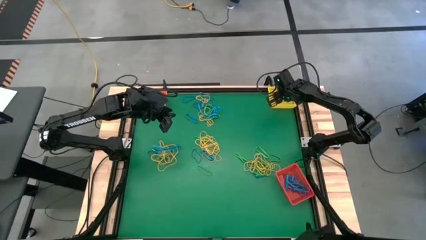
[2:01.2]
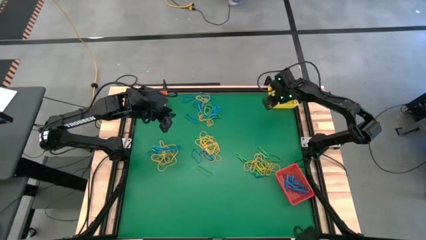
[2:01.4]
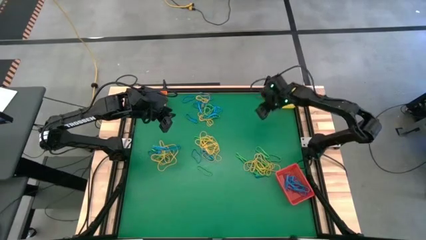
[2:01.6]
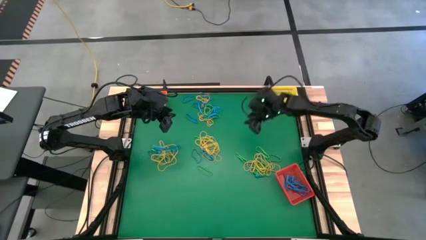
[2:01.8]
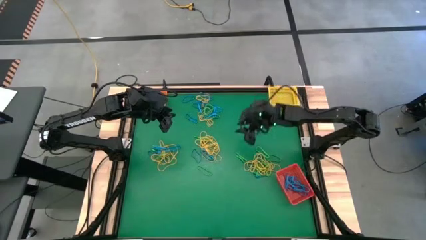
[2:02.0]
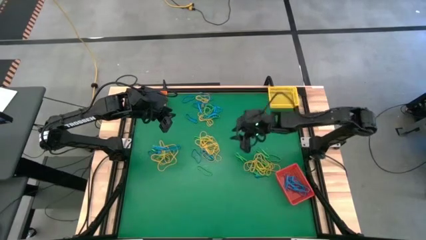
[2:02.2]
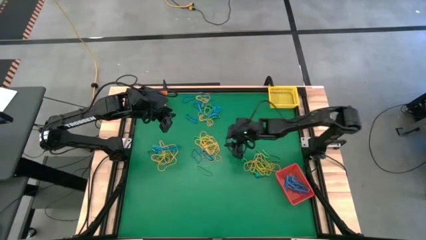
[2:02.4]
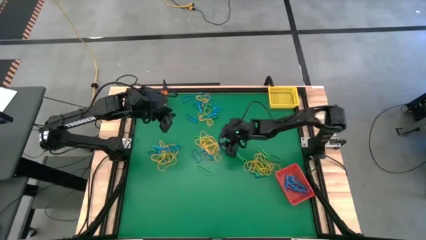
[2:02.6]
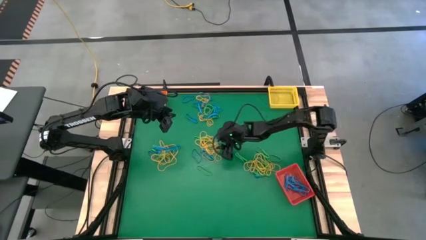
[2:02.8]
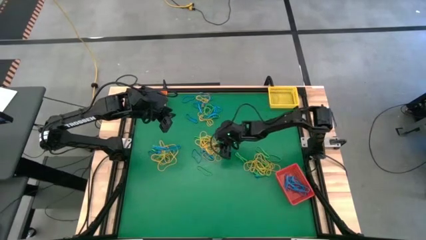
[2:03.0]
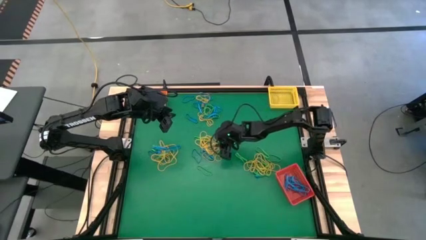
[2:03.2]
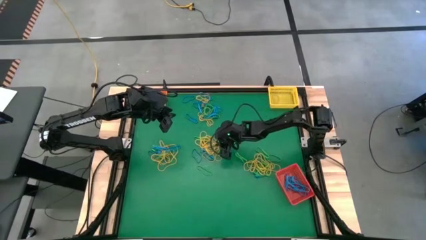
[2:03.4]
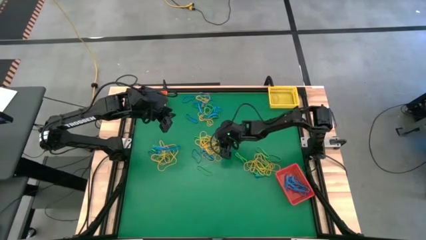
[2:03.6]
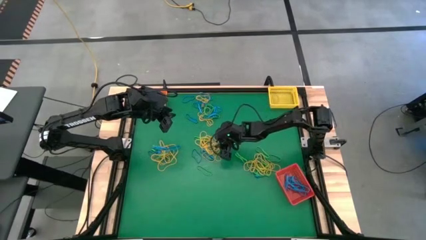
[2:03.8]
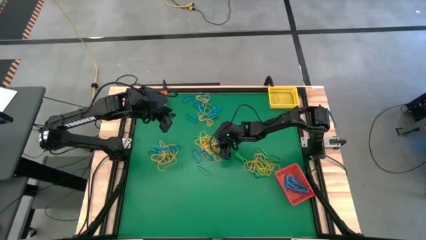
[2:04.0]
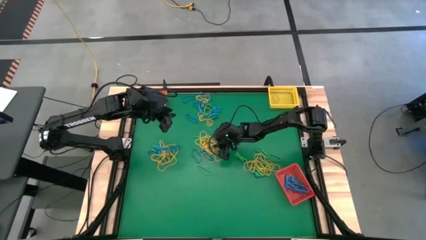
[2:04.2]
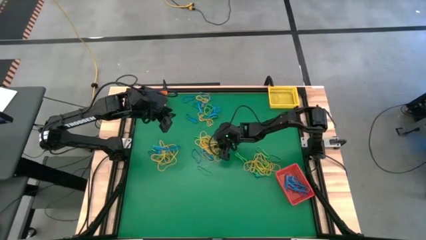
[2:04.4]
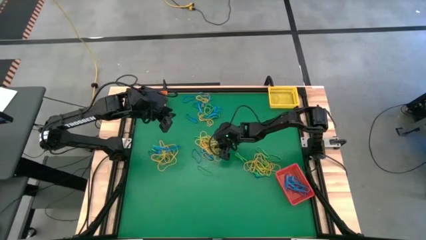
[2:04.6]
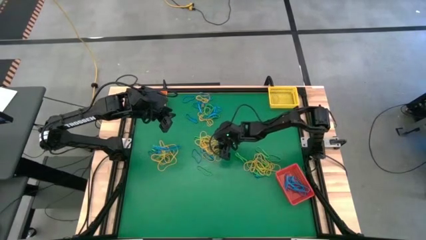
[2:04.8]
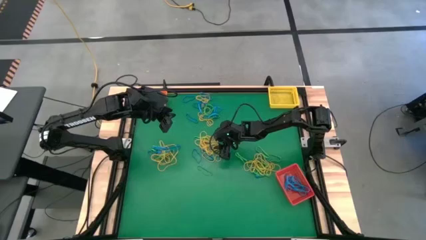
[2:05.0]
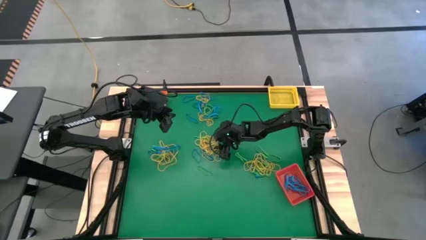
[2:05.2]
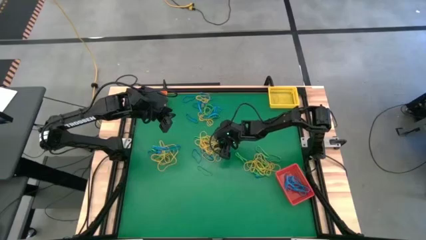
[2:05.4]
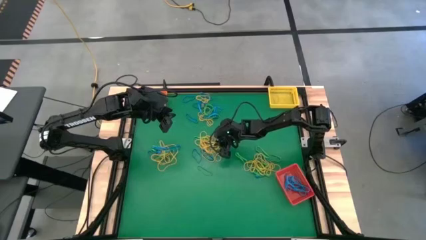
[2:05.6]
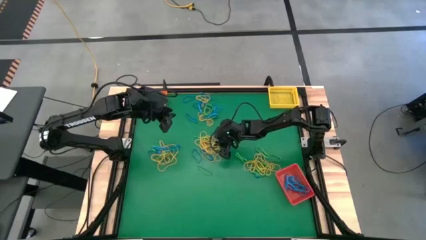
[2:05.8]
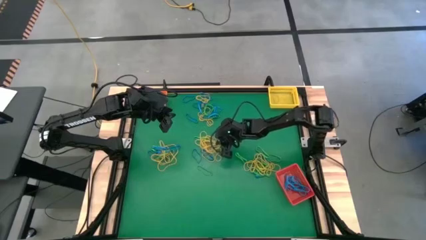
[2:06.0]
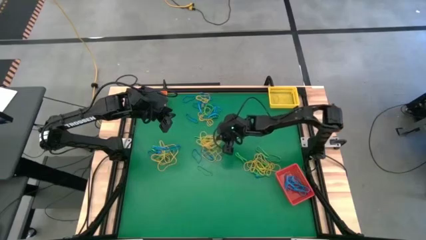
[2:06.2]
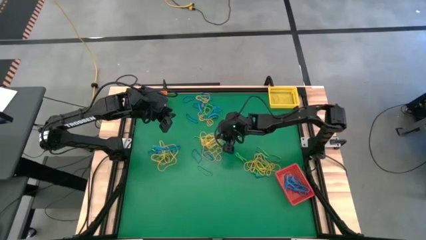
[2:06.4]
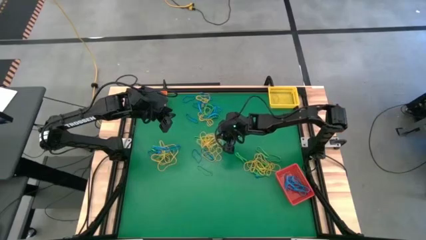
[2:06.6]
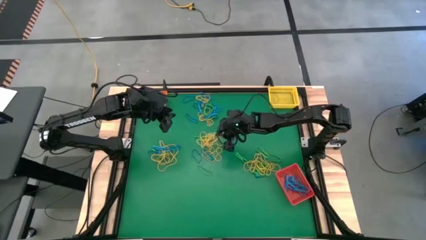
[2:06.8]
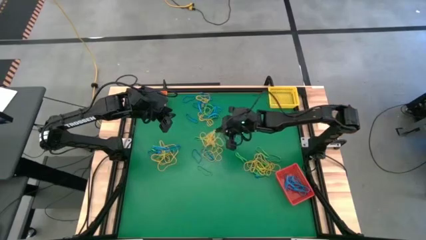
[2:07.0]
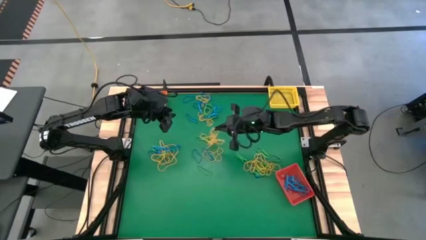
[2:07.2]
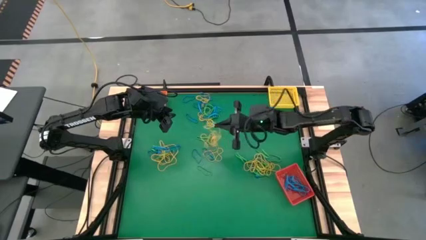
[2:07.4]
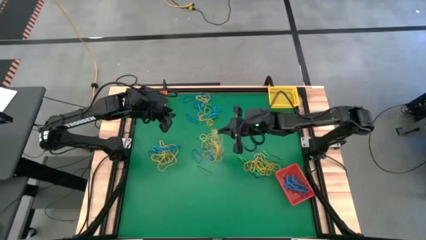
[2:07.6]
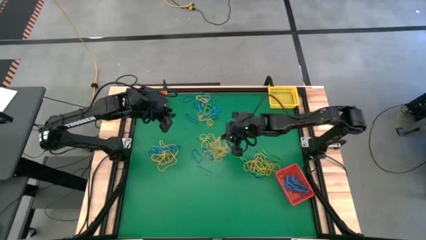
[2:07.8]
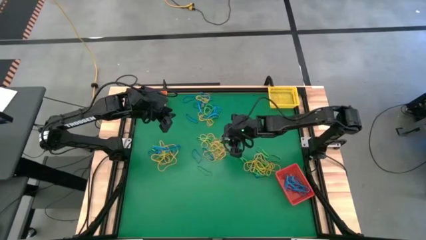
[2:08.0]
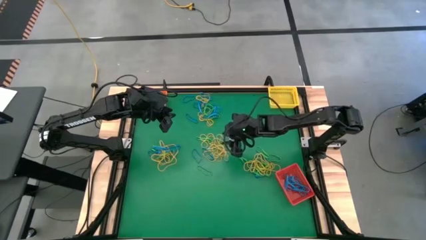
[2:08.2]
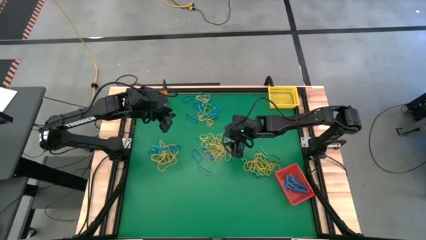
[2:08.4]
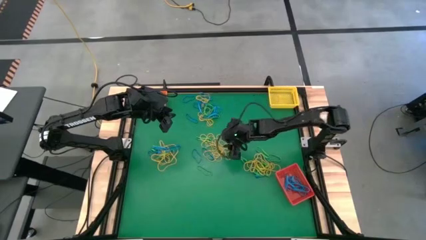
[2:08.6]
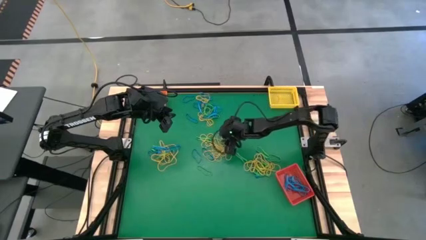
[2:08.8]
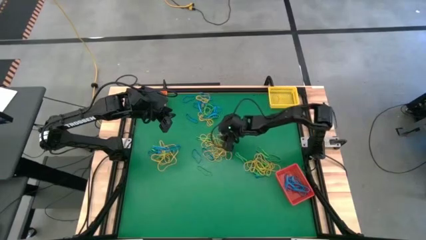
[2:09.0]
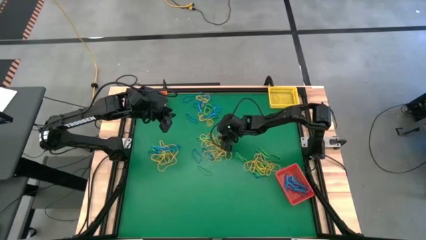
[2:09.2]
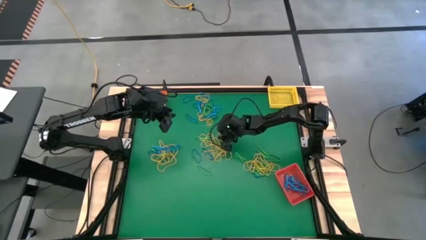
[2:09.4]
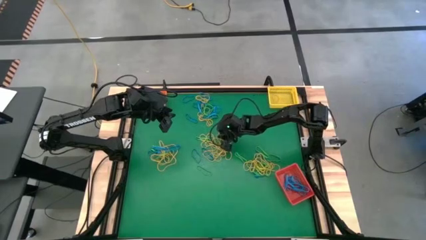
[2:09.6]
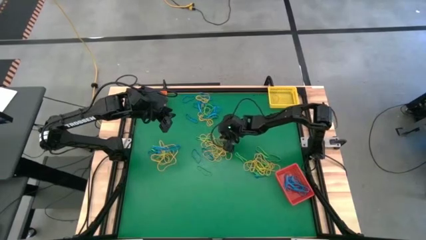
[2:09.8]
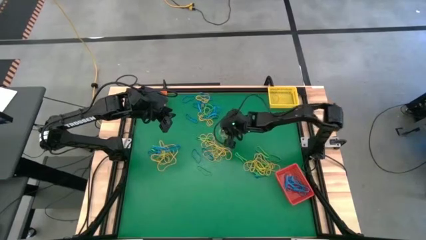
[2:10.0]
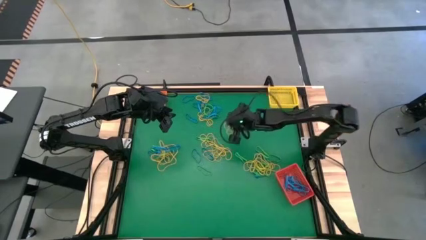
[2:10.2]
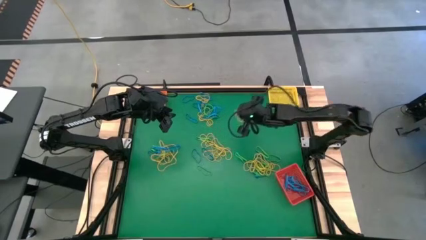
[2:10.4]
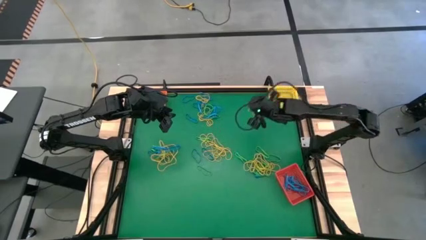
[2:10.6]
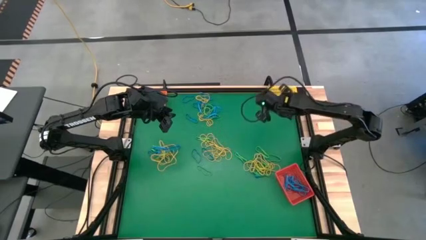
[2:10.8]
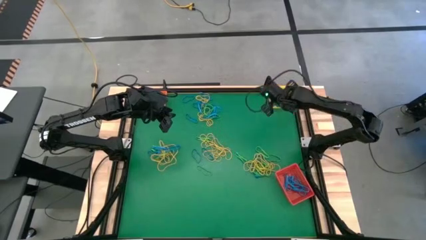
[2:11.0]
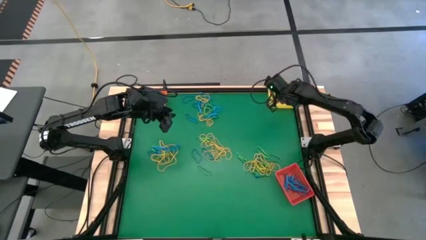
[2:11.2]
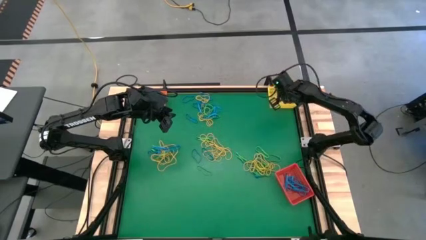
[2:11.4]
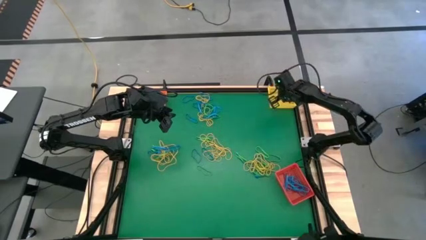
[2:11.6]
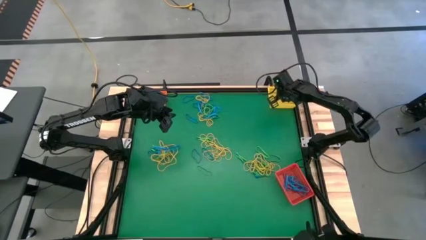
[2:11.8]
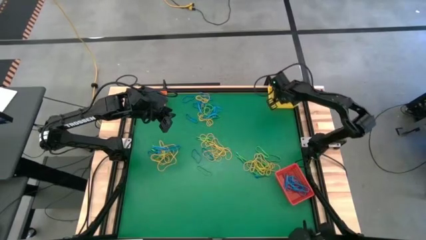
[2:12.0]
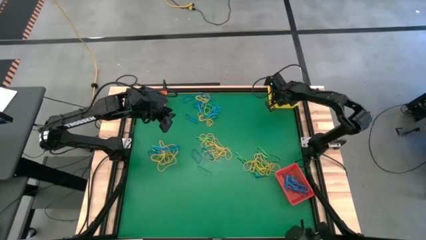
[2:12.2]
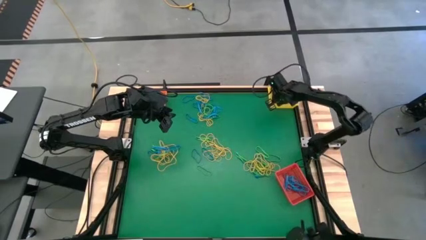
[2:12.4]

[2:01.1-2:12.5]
Task: Sort rubber bands into baskets
Put the yellow rubber band into the yellow bin

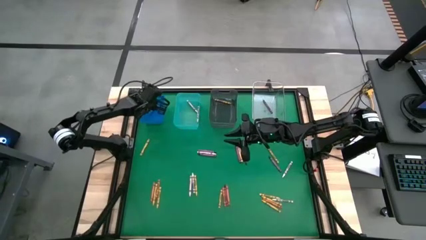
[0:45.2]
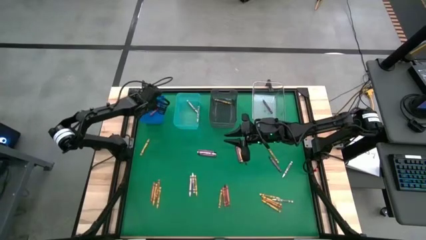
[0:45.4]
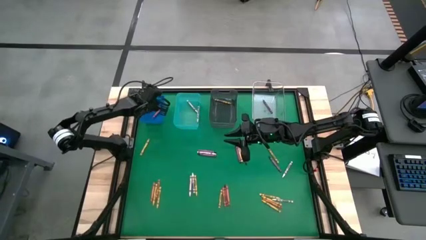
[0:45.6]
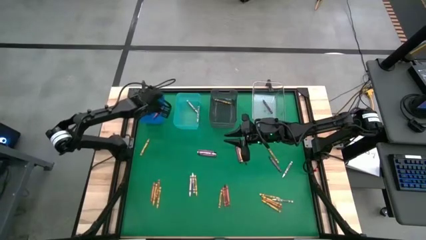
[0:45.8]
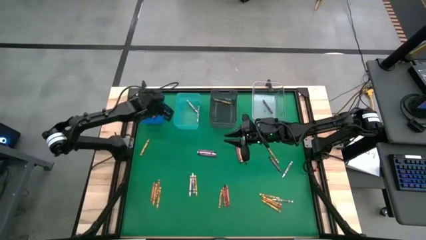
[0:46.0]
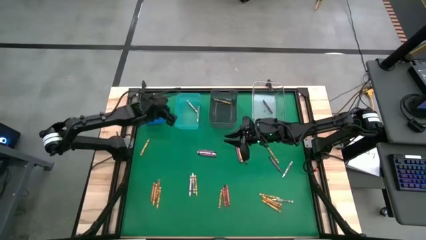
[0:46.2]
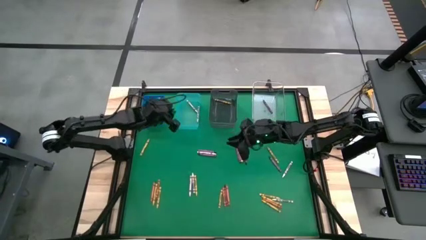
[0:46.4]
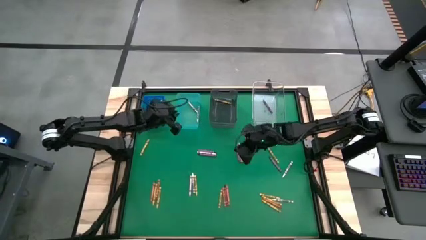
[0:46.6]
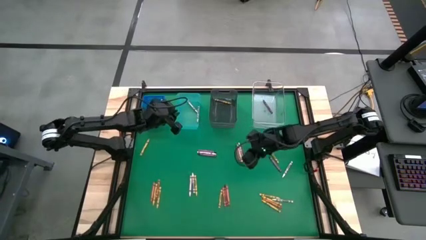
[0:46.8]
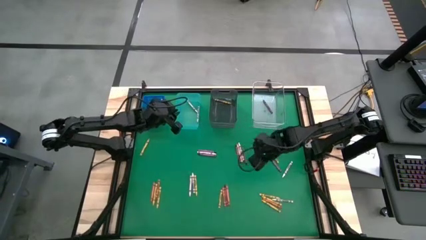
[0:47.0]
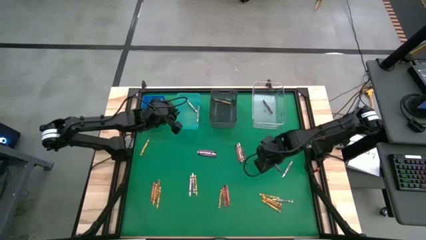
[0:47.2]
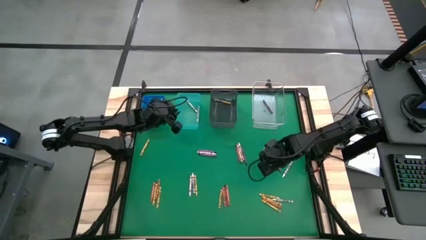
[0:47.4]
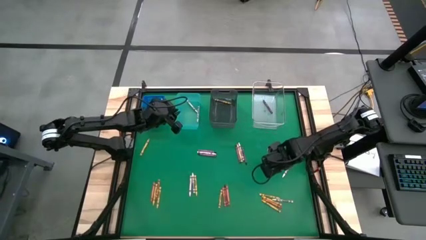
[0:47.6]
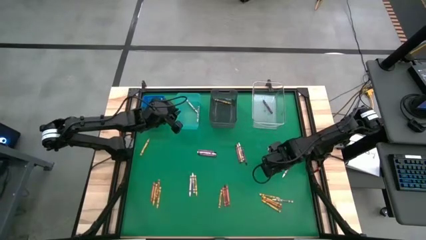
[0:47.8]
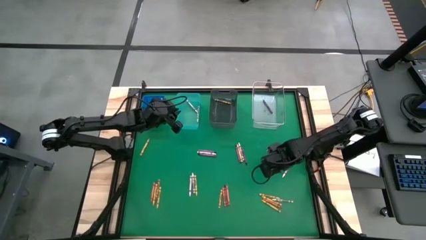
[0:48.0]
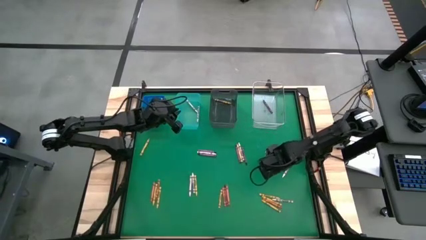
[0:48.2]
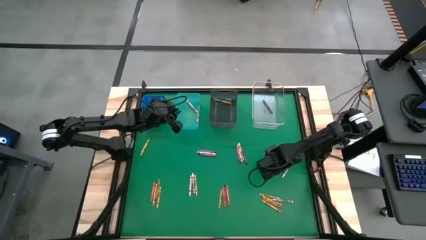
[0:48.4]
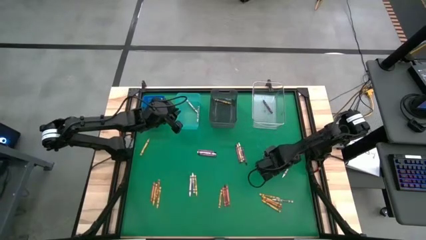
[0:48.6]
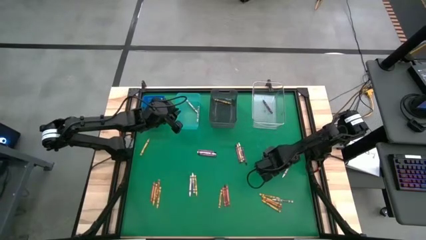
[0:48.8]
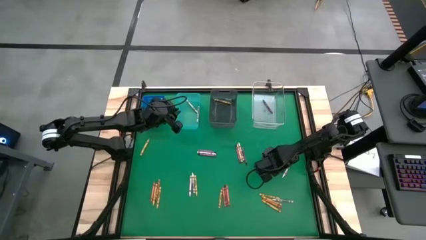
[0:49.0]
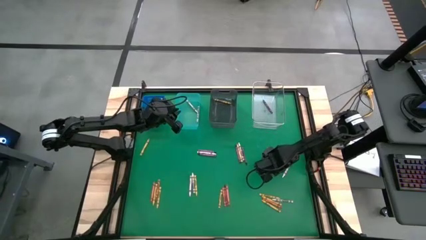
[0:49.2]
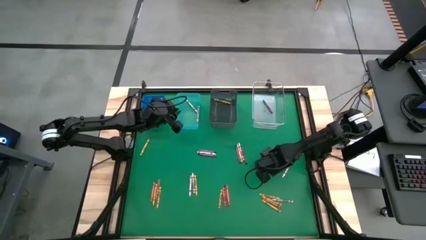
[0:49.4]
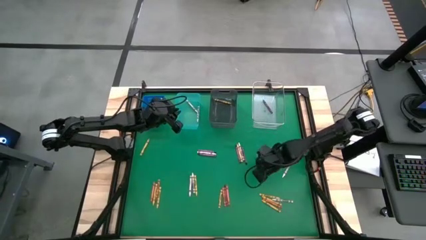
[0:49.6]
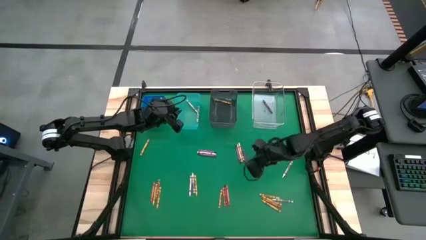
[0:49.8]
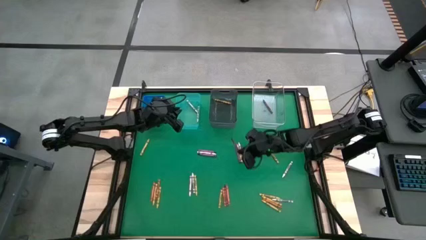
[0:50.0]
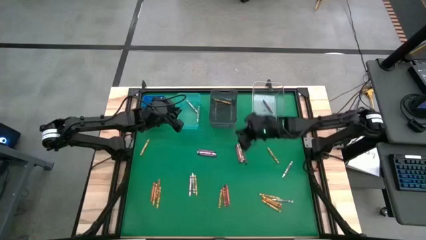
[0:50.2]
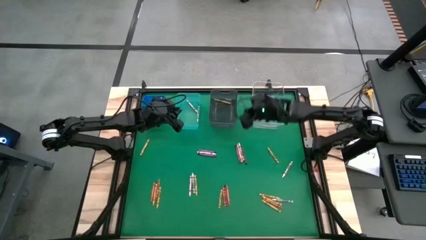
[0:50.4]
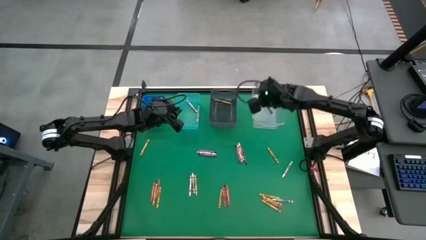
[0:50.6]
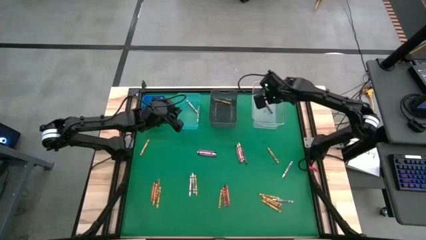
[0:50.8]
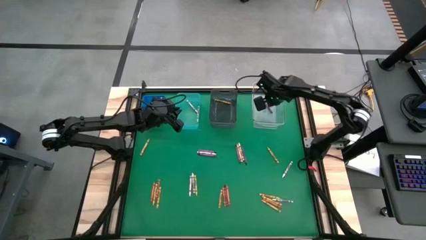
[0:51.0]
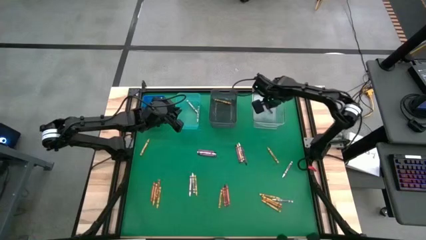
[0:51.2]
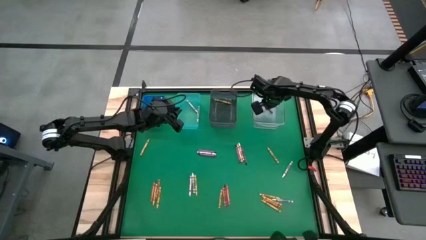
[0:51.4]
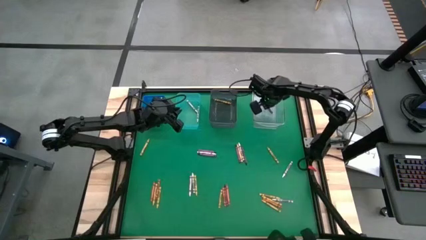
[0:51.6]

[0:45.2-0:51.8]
Task: Sort crayons
Put the violet crayon into the black bin
